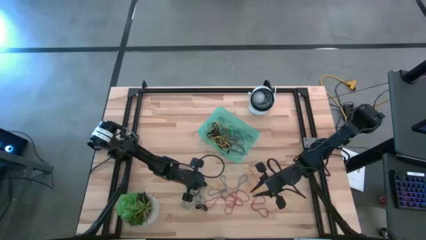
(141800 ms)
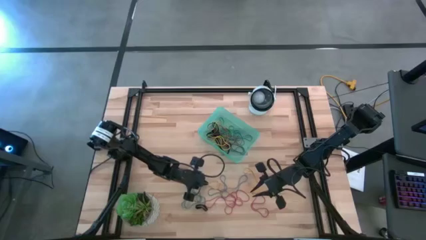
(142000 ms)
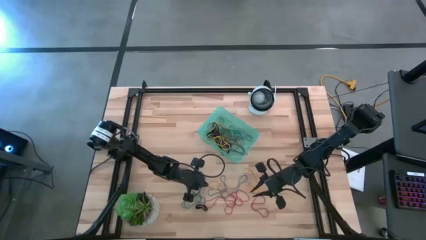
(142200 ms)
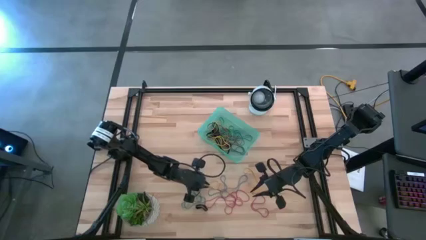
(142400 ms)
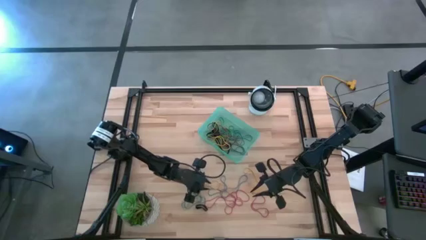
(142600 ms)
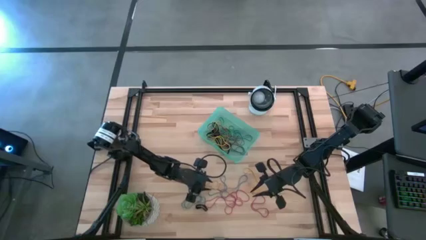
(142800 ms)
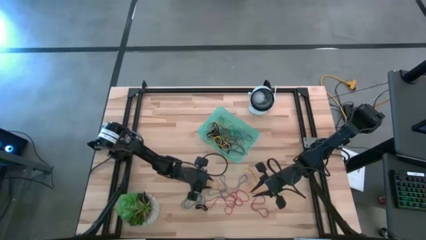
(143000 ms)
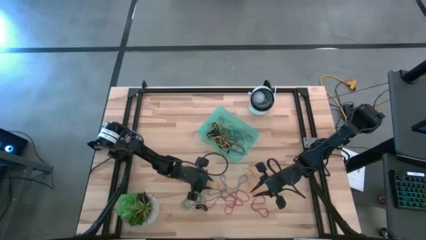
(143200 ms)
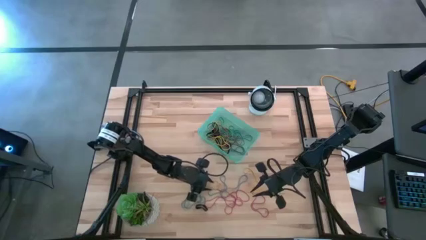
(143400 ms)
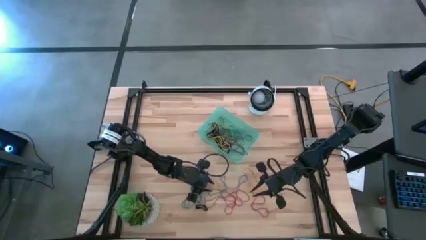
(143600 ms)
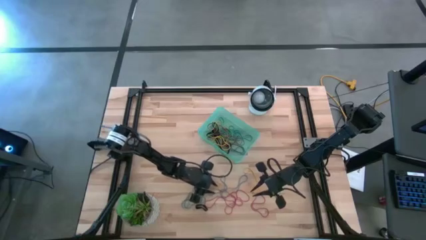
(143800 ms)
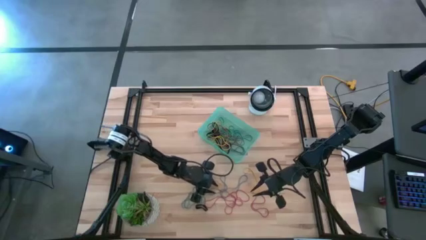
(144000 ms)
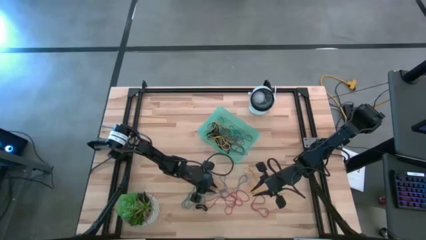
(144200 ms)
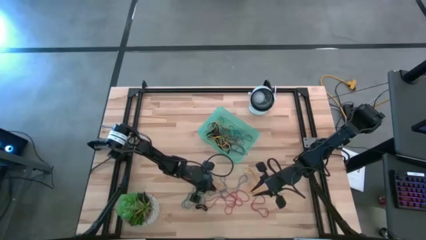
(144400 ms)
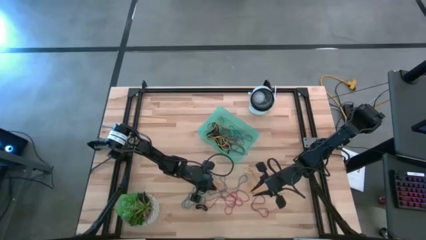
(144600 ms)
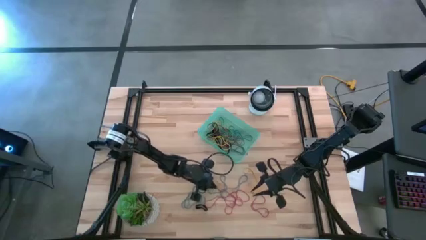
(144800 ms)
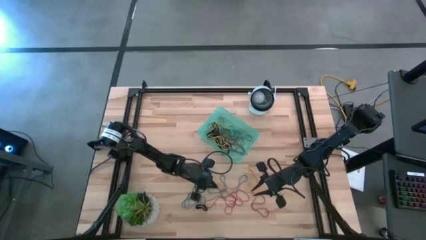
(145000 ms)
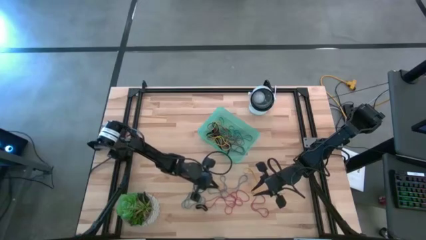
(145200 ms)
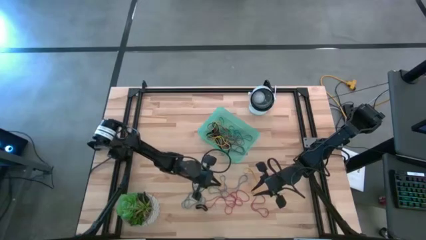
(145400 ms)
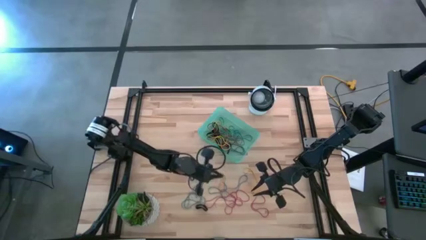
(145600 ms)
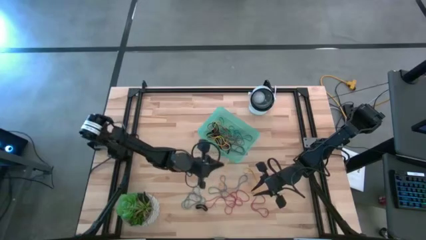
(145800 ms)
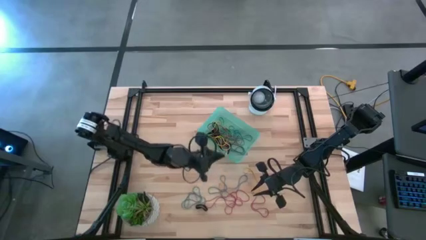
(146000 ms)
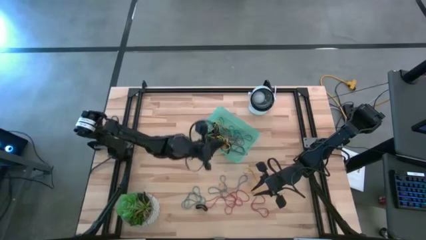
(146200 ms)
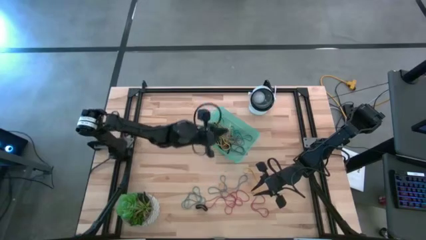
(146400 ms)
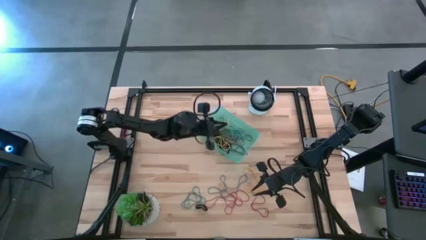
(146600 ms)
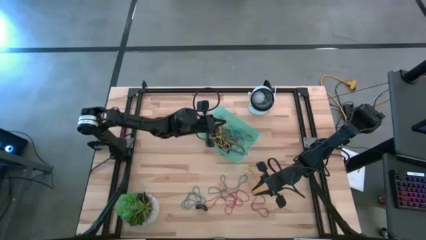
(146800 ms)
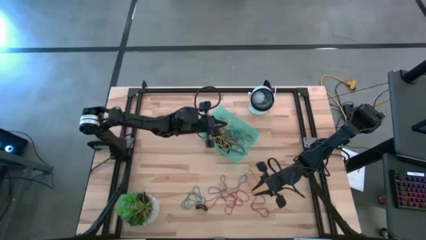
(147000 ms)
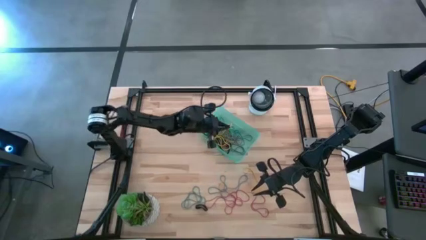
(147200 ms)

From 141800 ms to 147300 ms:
Task: Pick and place rubber bands into bin
Put the yellow rubber band into the blue bin

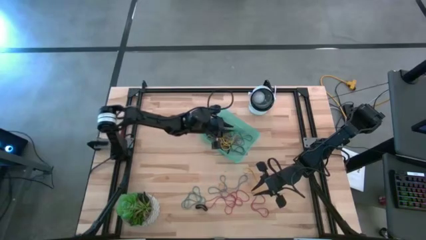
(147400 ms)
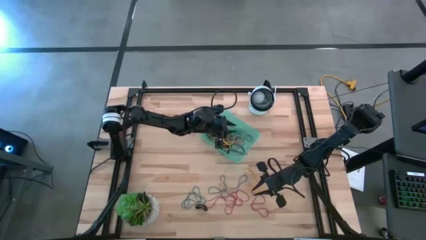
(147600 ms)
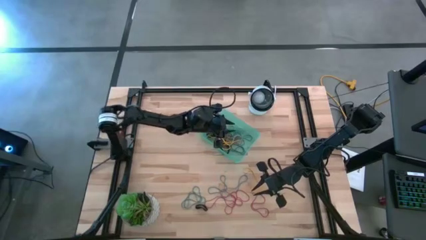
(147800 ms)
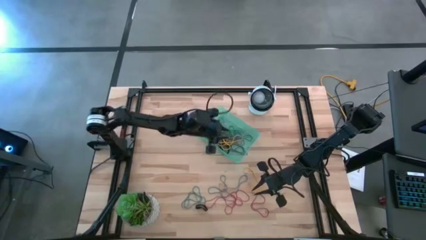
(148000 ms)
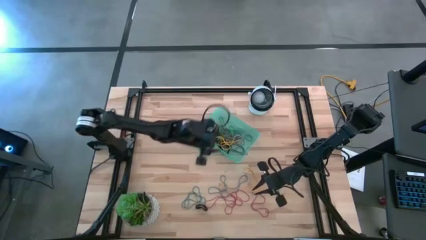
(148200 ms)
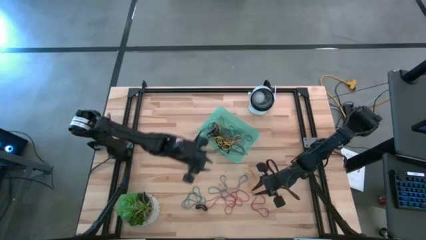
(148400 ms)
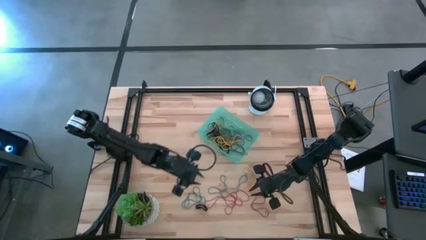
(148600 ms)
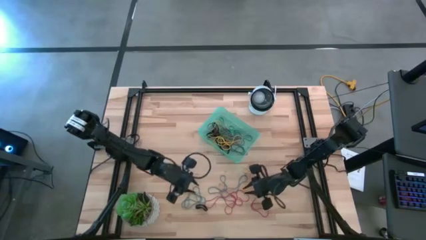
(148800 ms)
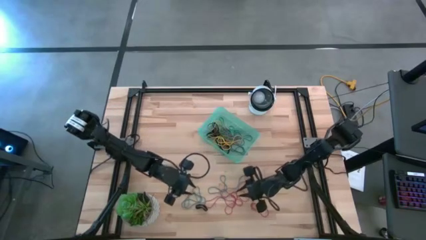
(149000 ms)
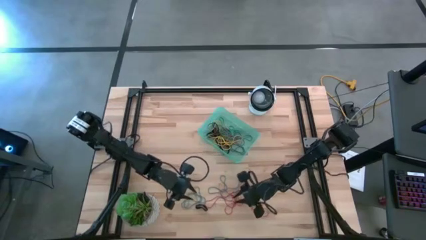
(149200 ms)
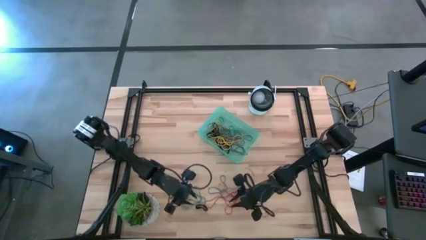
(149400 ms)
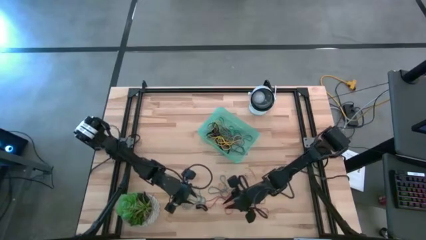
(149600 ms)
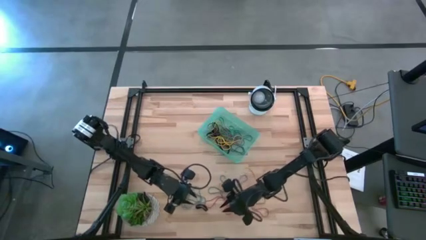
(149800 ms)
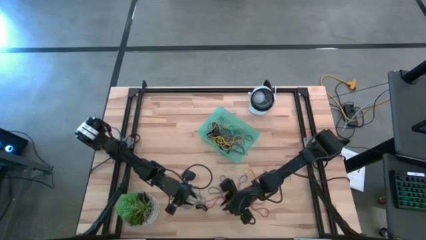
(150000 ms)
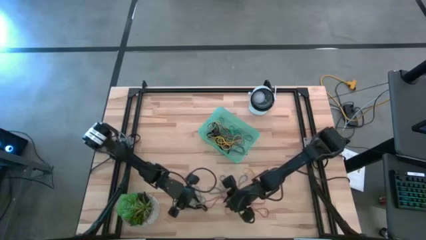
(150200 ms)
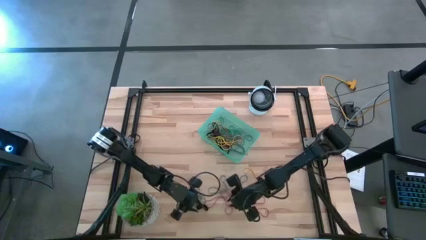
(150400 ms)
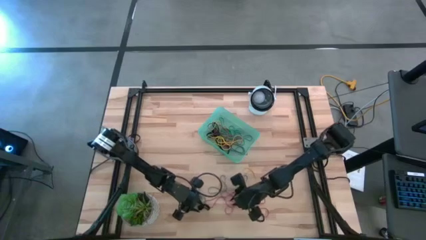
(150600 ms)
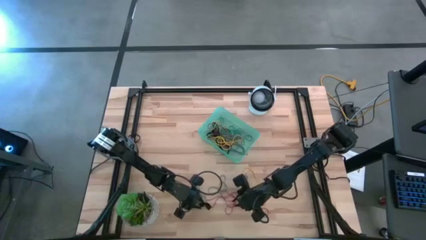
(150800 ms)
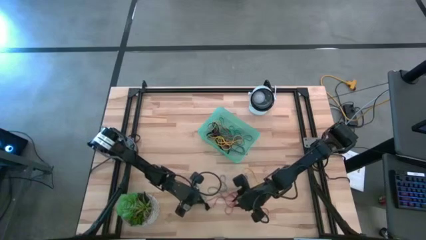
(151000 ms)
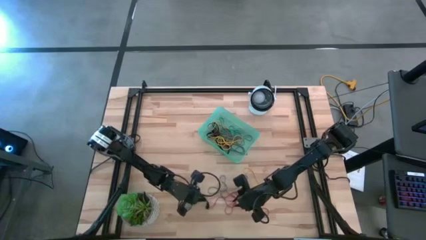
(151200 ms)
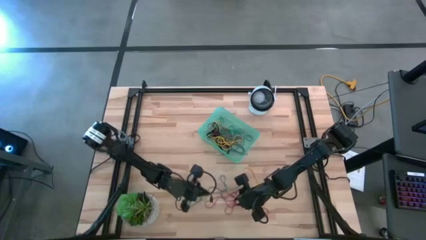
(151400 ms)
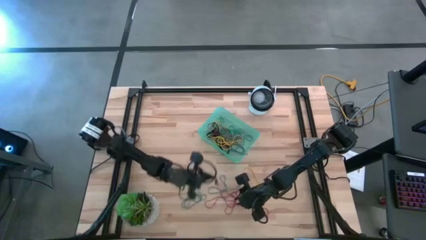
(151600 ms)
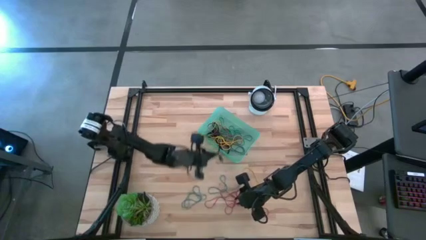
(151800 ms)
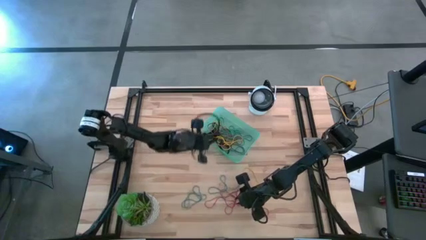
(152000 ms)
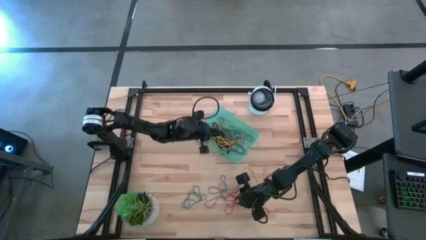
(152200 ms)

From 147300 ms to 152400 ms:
Put the black rubber band into the blue bin

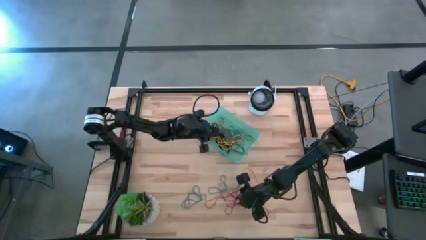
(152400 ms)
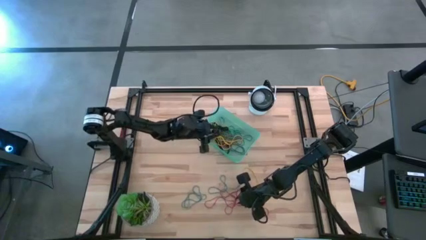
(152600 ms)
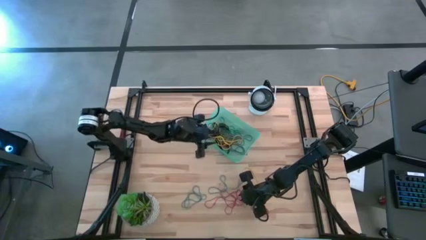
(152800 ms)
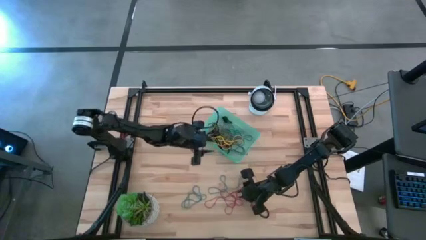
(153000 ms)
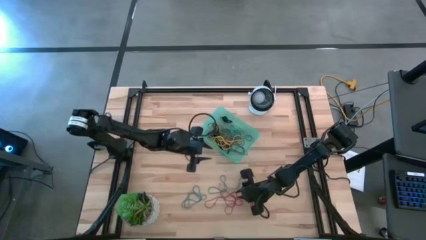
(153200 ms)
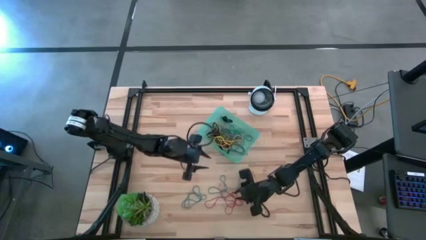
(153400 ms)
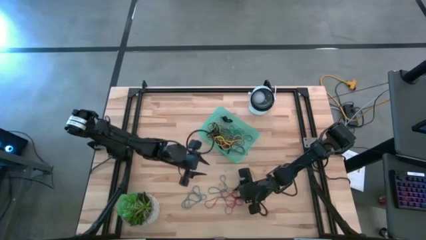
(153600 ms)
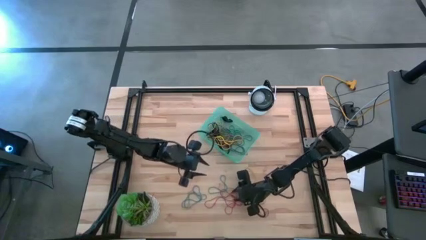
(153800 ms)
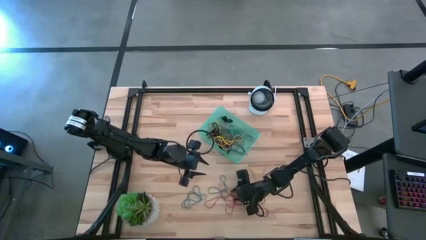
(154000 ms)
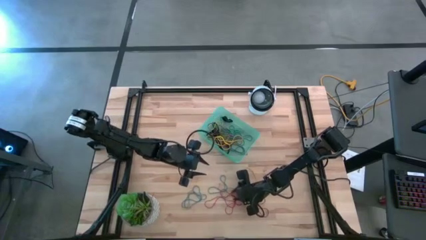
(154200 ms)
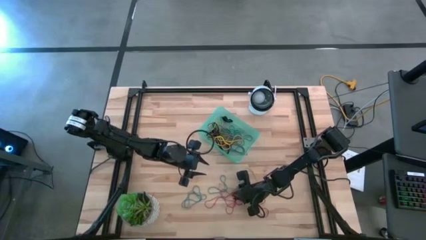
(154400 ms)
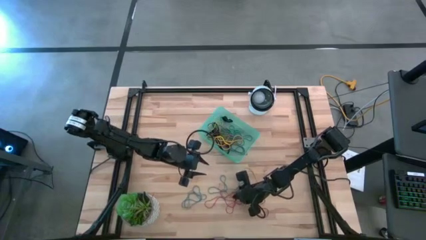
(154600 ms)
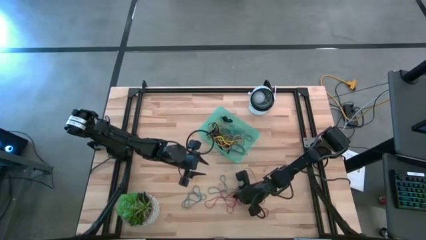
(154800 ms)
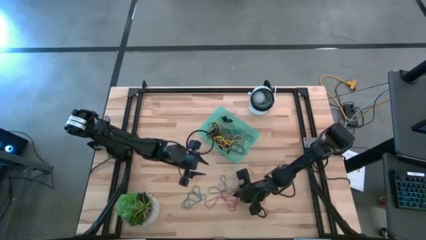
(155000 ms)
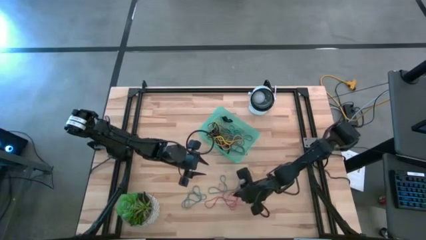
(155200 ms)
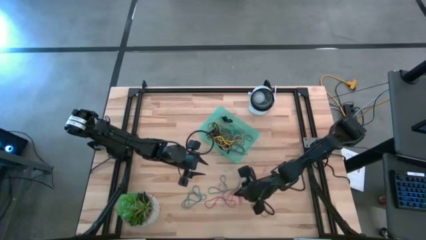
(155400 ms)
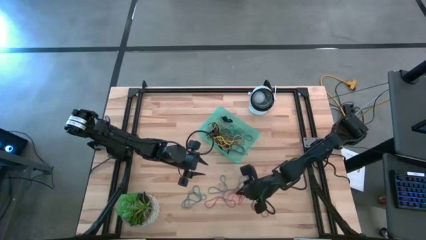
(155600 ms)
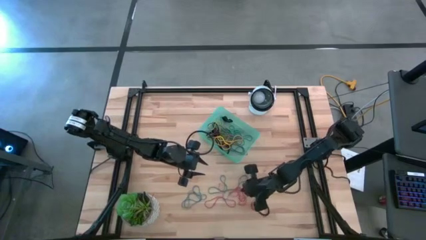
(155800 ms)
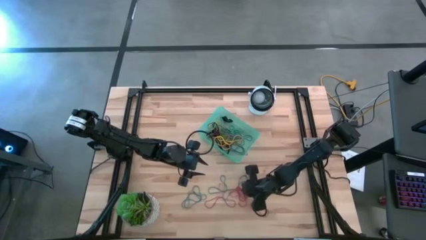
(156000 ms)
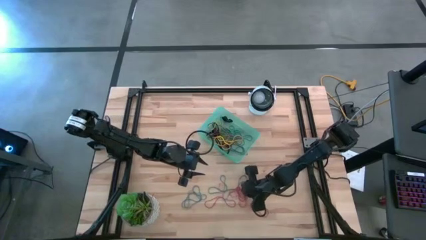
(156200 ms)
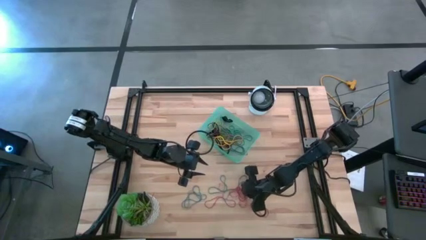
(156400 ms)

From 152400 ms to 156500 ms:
Put the red rubber band into the blue bin

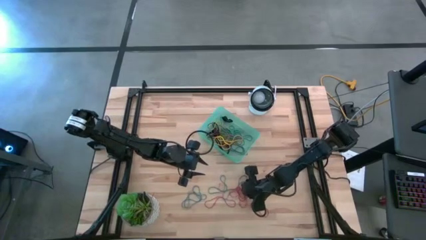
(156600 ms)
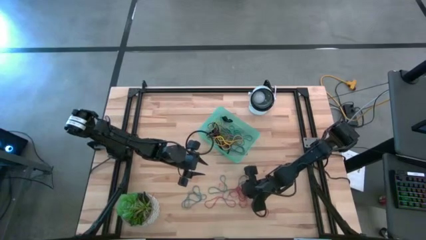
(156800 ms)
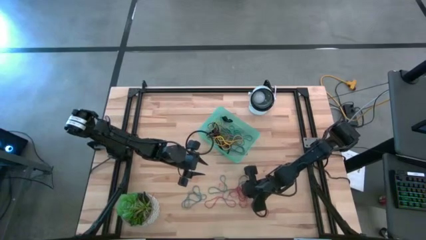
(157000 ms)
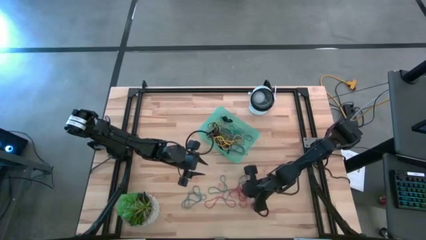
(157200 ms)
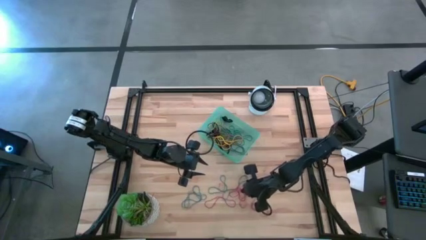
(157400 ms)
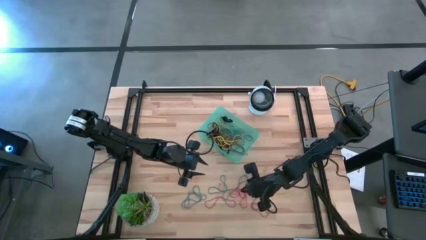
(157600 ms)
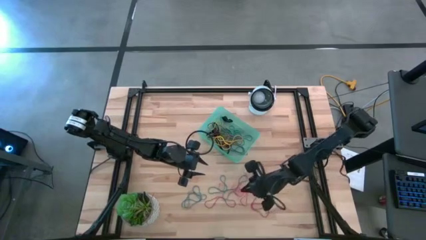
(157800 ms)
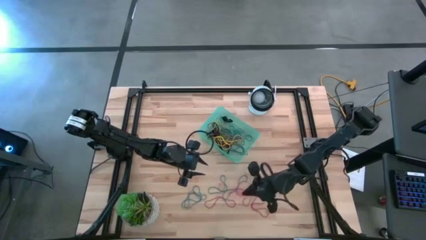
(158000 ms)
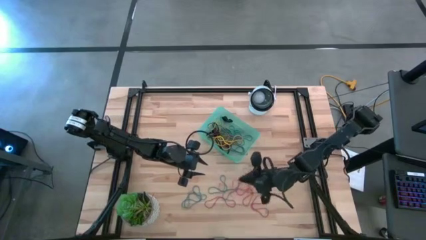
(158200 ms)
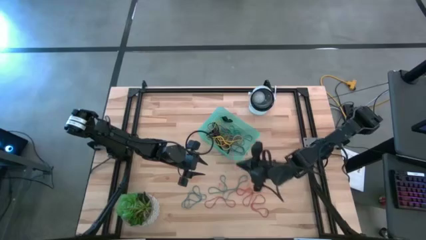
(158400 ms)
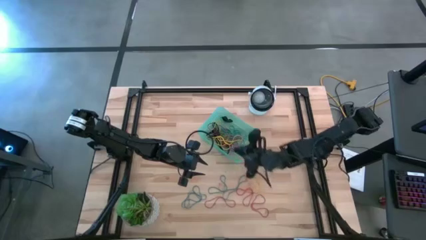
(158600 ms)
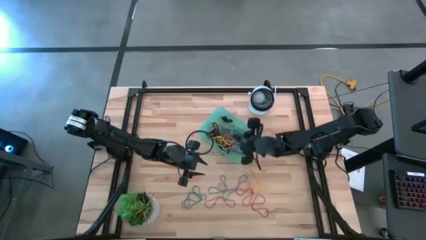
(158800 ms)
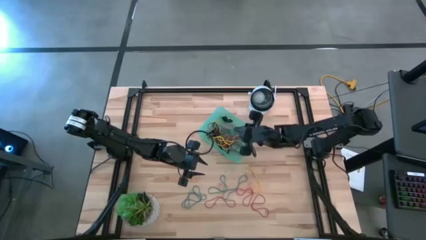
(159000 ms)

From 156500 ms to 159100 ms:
Put the red rubber band into the blue bin
